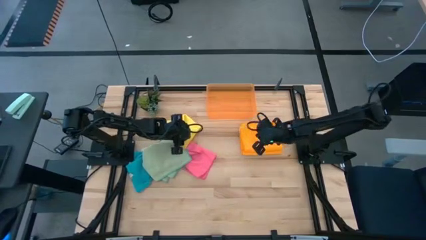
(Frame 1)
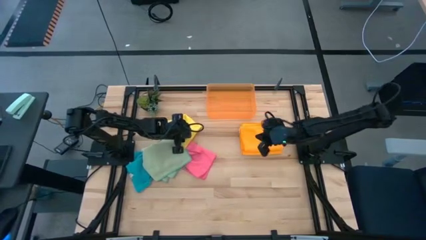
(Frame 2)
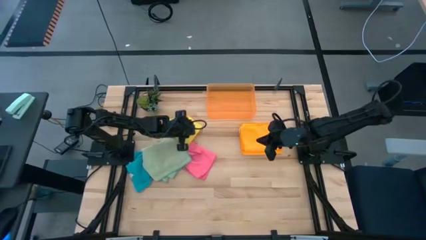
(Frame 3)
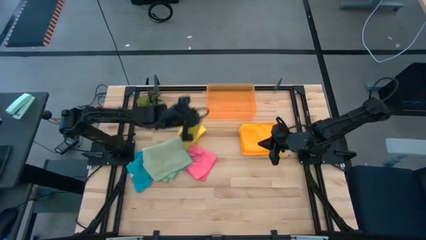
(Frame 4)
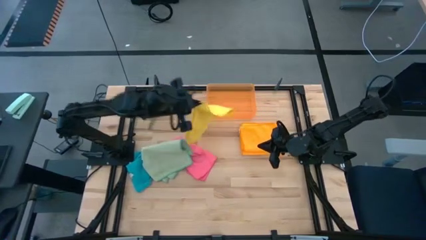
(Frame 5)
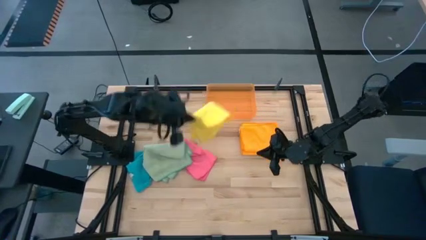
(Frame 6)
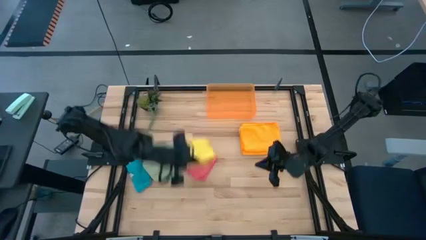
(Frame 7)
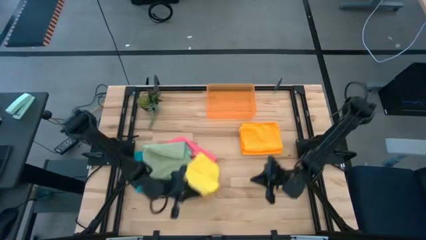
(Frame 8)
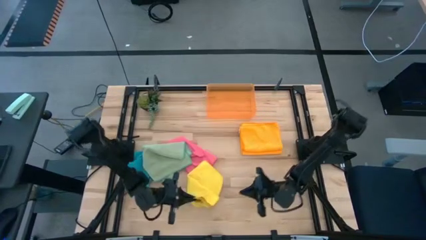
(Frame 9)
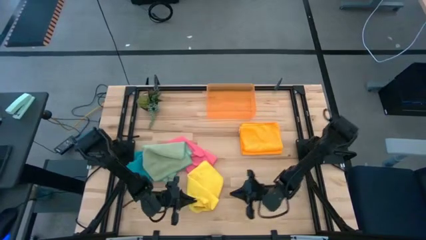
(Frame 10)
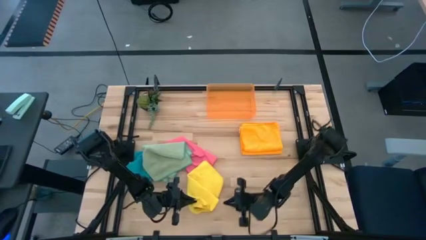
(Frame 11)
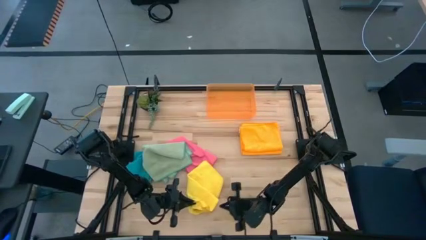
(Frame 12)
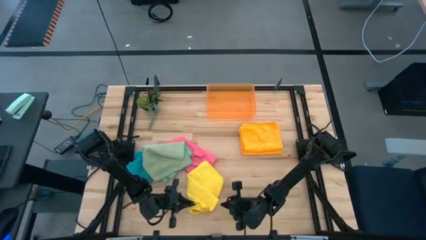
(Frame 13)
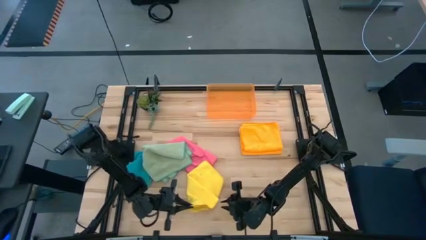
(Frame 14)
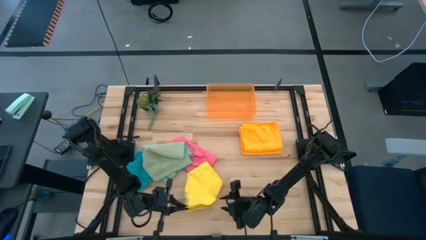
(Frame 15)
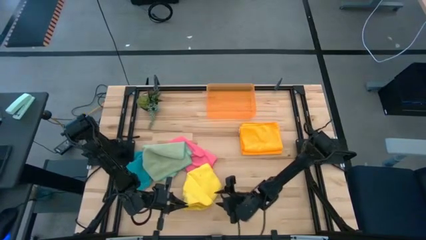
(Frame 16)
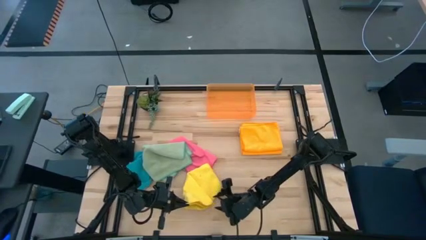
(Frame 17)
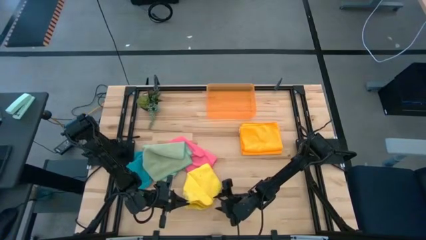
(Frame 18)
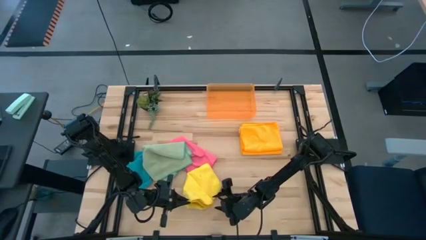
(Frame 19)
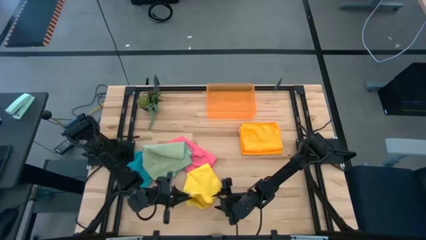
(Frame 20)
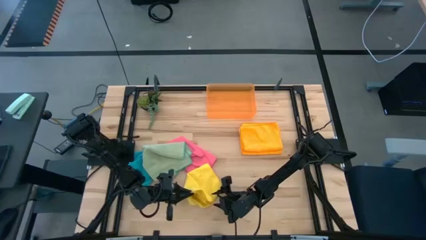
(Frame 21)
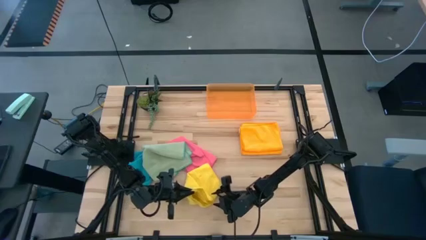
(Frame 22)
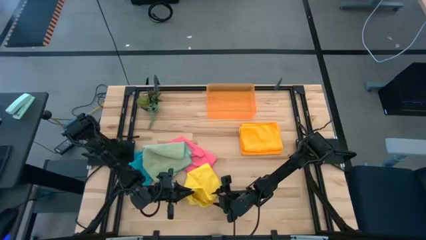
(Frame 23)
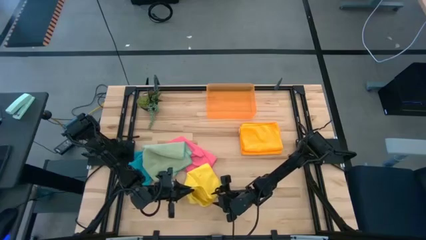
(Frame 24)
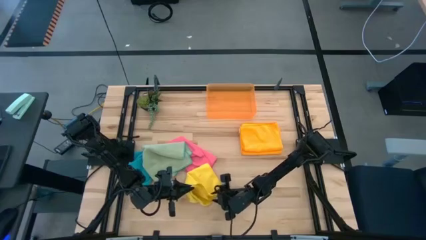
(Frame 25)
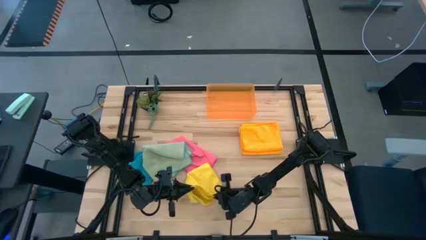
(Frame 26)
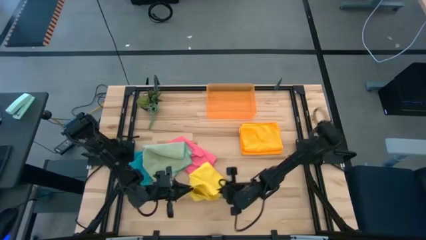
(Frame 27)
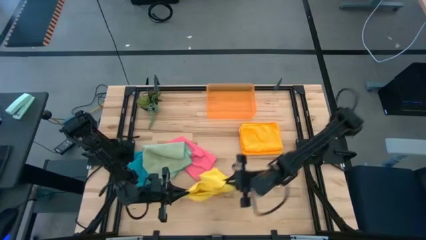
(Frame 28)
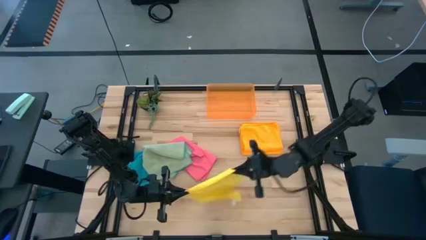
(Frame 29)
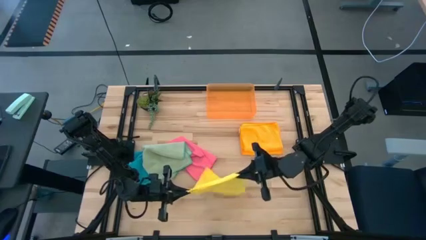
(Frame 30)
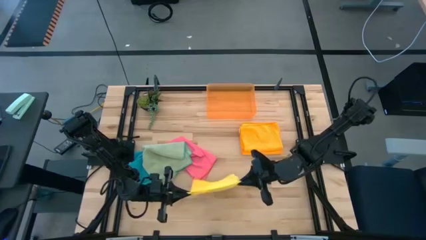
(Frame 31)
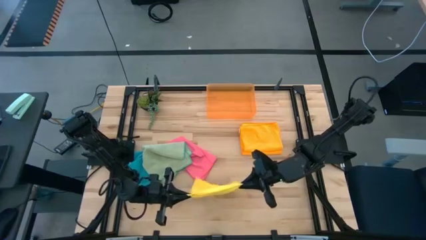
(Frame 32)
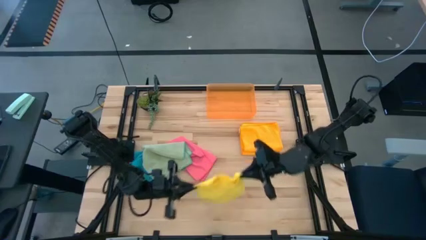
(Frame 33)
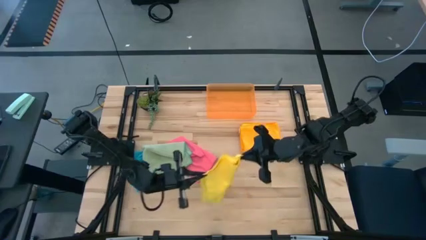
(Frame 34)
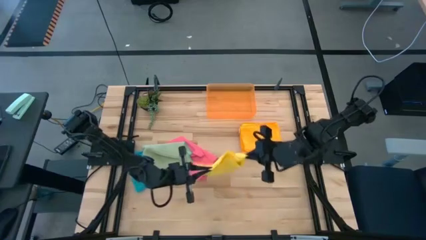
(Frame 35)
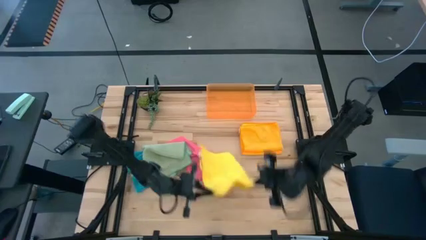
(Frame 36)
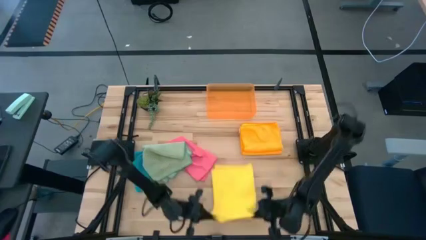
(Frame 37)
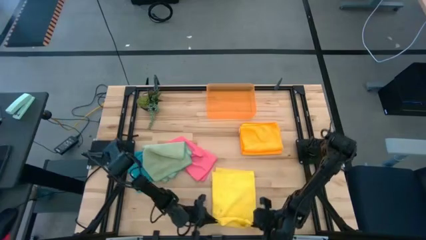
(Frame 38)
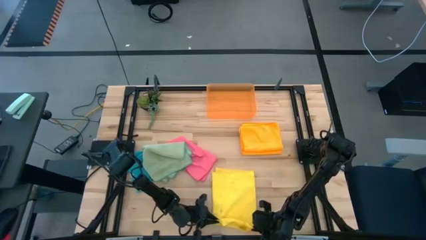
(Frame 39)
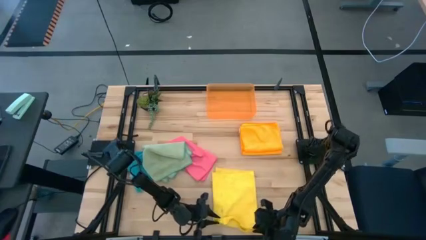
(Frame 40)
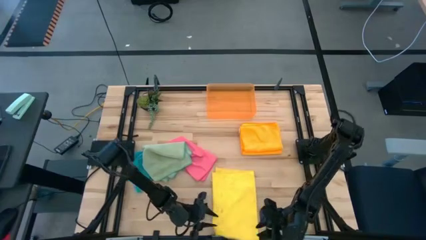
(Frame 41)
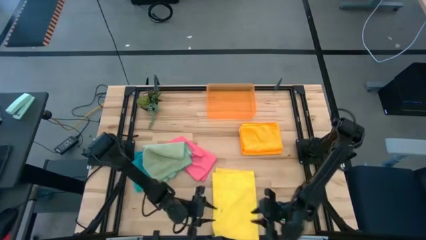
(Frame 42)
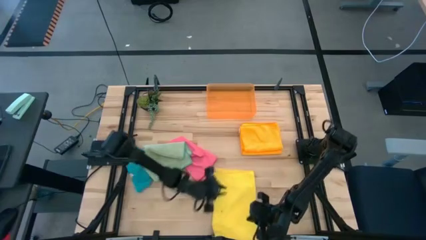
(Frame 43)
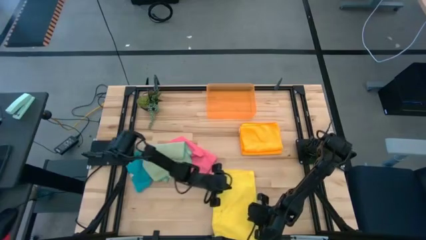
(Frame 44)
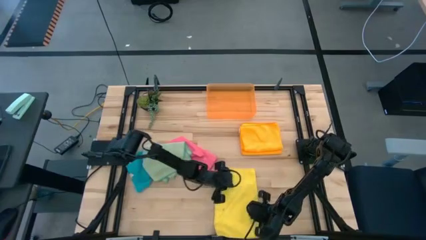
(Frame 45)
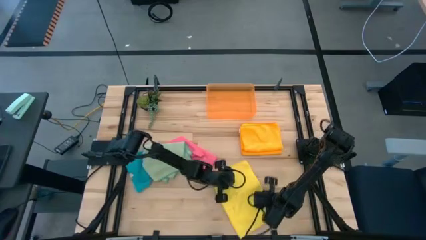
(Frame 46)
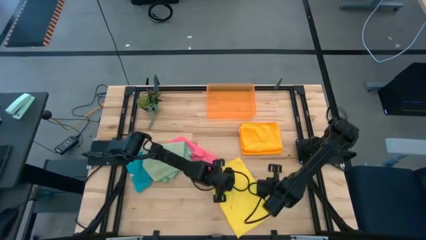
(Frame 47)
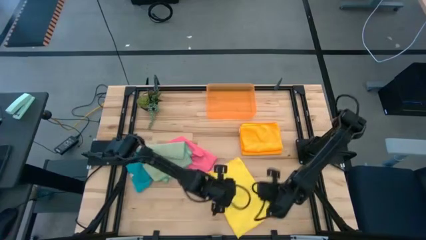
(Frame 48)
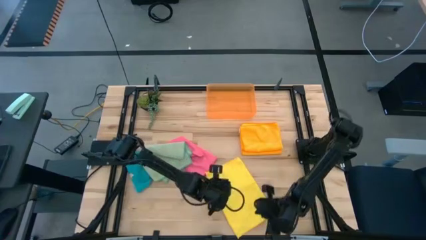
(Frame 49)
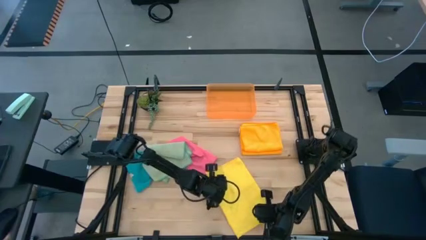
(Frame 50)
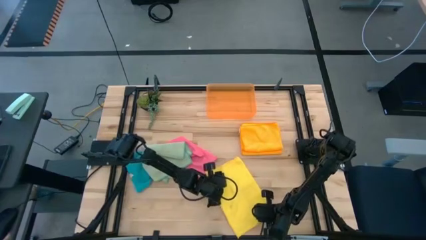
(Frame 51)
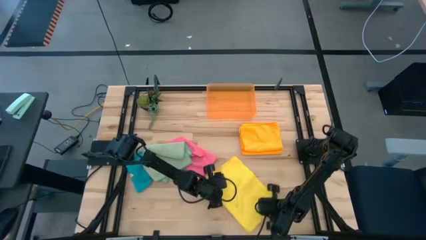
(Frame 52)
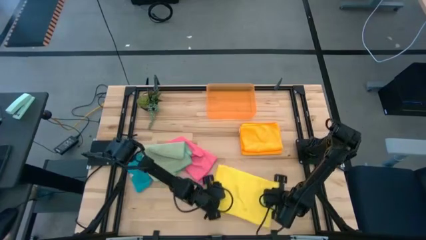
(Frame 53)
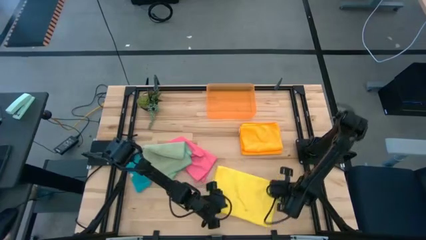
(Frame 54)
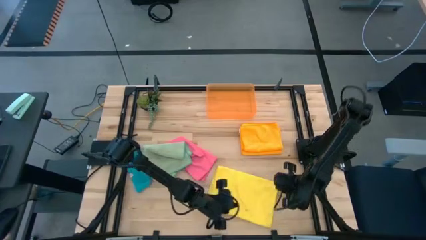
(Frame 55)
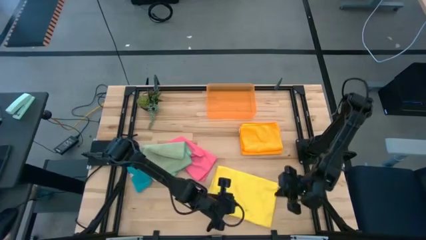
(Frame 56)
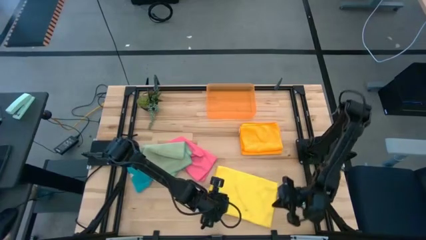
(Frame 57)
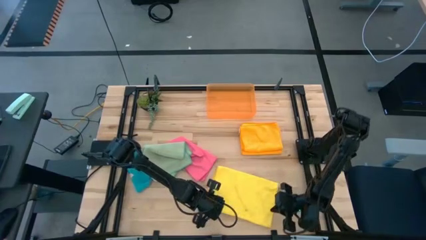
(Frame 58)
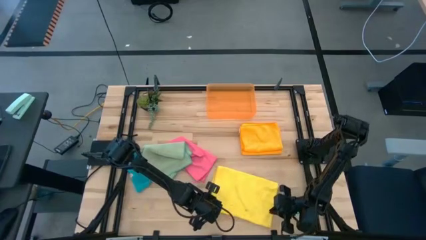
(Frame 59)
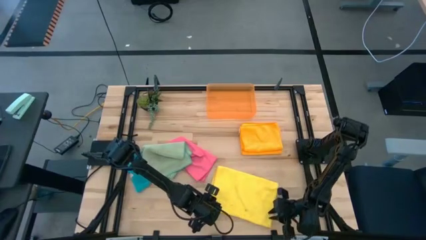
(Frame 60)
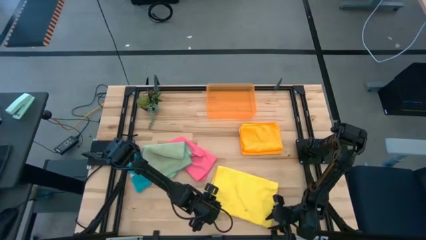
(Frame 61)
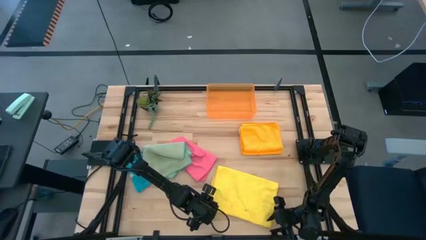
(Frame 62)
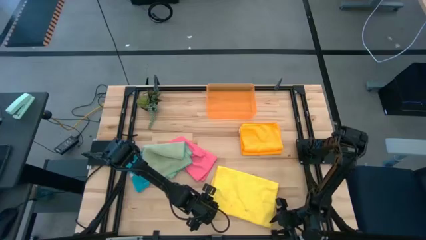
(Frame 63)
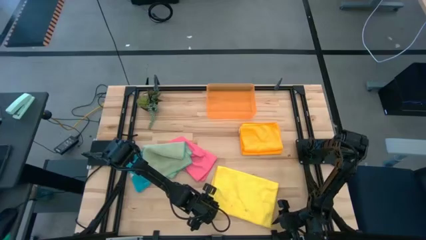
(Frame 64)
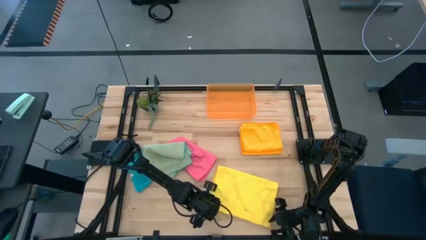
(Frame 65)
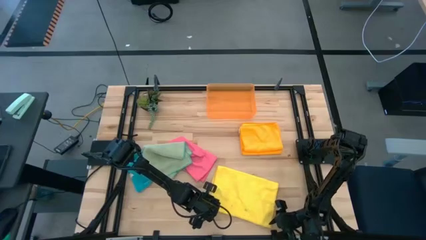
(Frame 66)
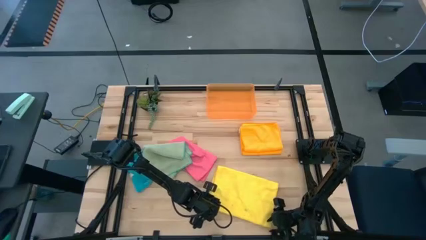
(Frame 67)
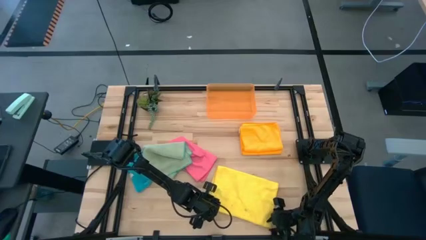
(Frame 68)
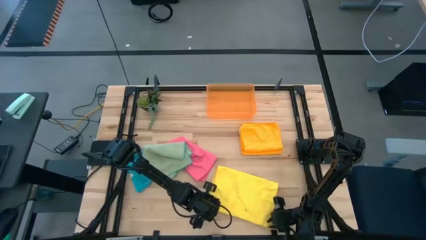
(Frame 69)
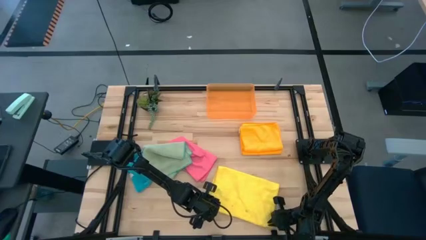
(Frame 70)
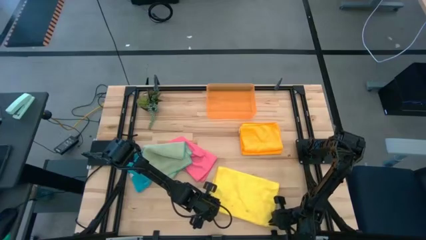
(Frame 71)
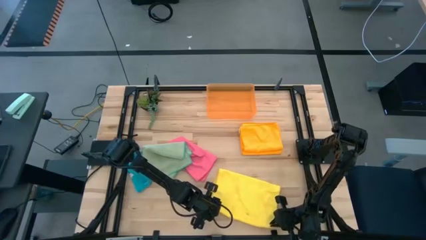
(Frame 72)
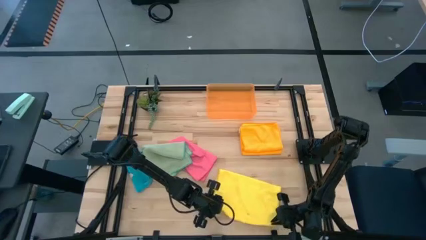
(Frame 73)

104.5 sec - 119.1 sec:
Task: Fold microfiber towels
Fold the yellow microfiber cloth

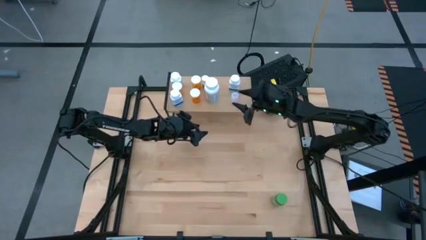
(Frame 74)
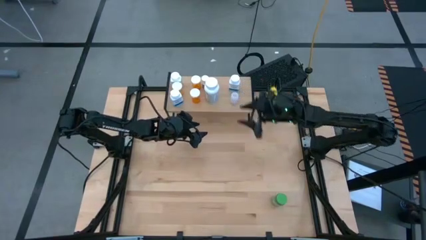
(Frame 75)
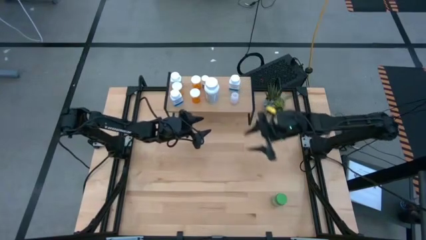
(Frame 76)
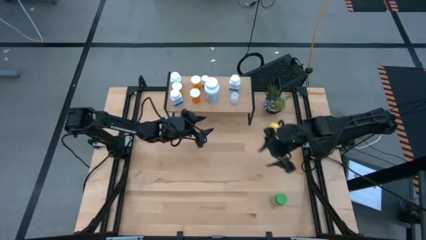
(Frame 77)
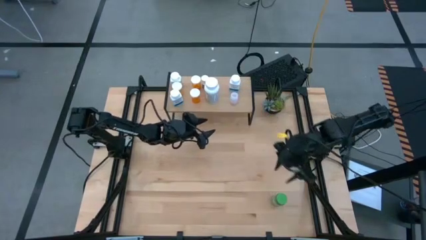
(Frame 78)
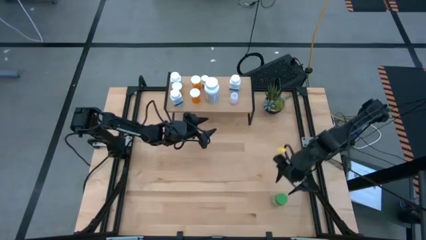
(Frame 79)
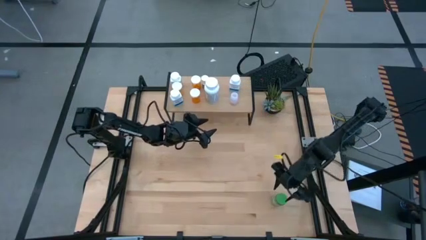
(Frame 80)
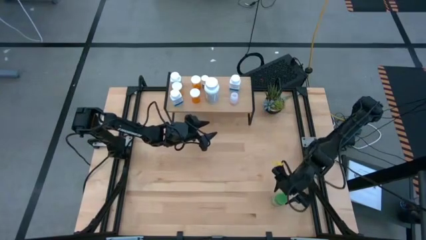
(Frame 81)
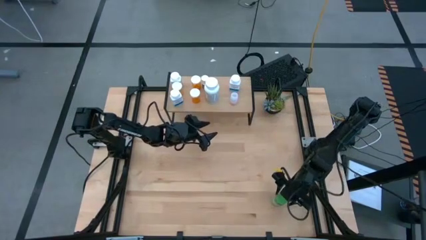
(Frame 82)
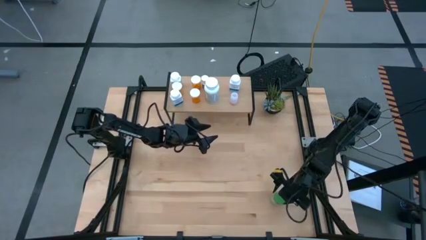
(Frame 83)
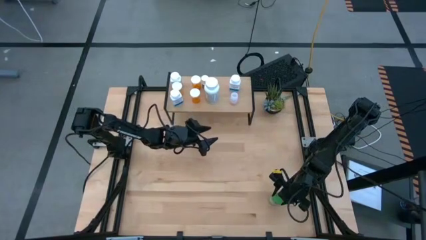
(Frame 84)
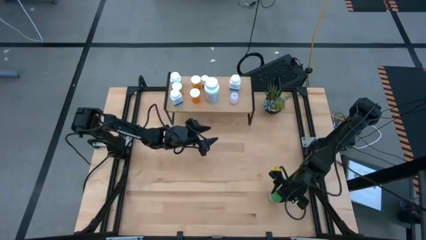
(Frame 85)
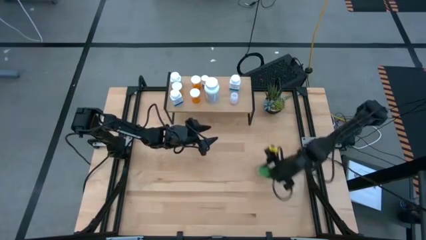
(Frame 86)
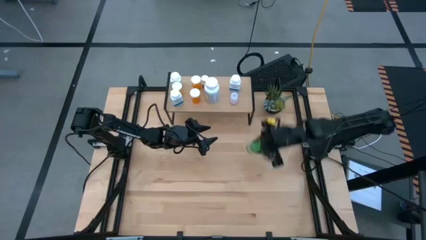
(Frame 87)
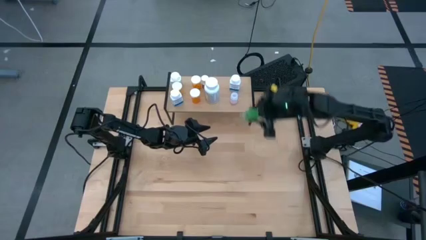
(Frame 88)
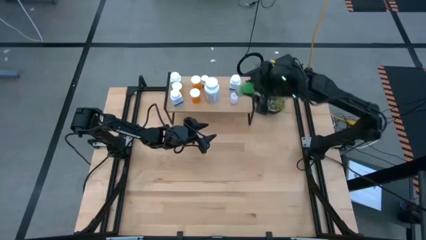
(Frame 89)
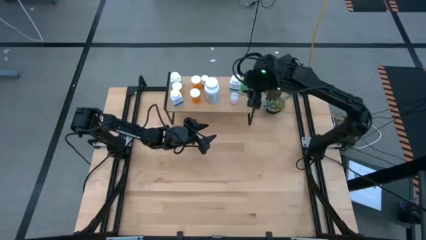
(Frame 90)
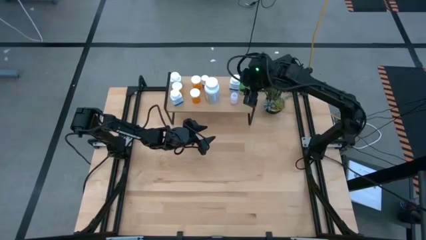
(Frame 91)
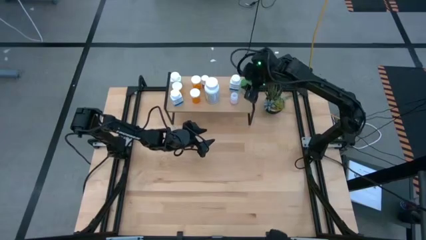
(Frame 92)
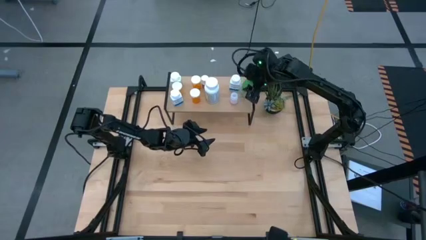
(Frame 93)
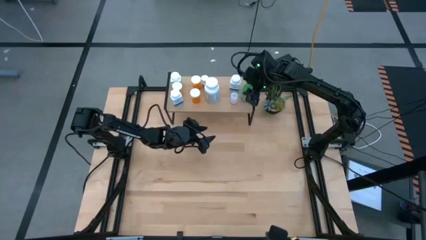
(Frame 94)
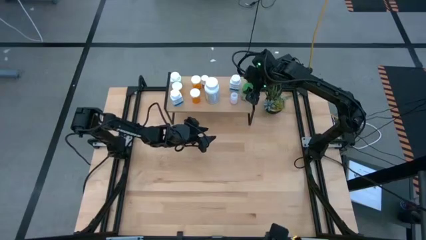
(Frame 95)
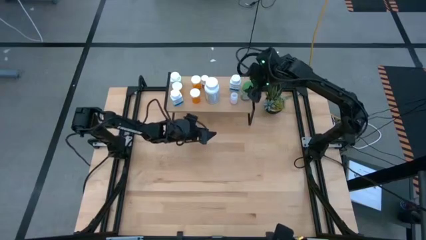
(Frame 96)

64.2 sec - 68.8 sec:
Task: Pick and place medicine bottles onto shelf by color
Put the green pill bottle on the shelf
